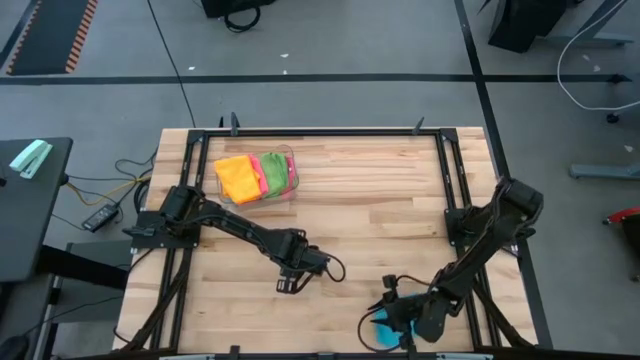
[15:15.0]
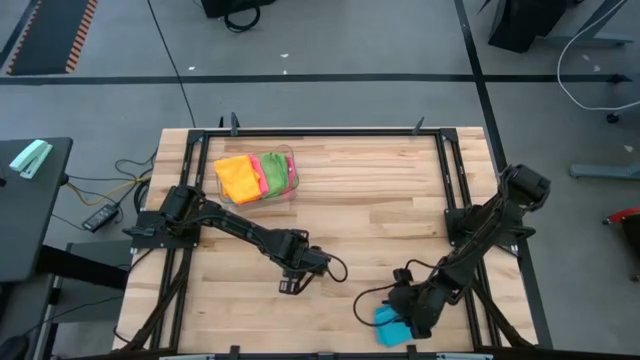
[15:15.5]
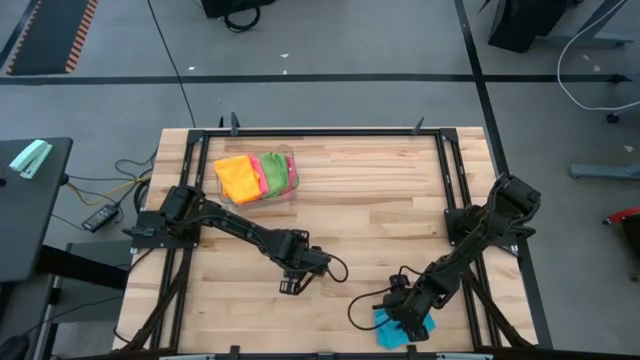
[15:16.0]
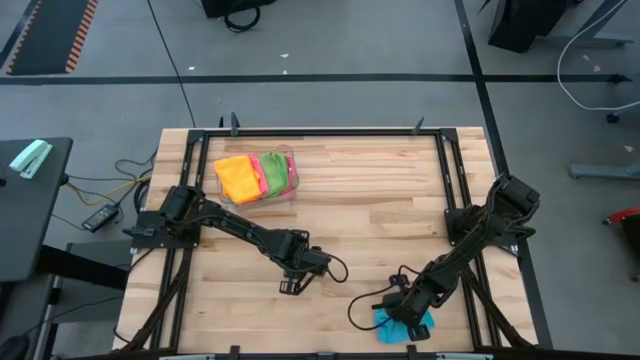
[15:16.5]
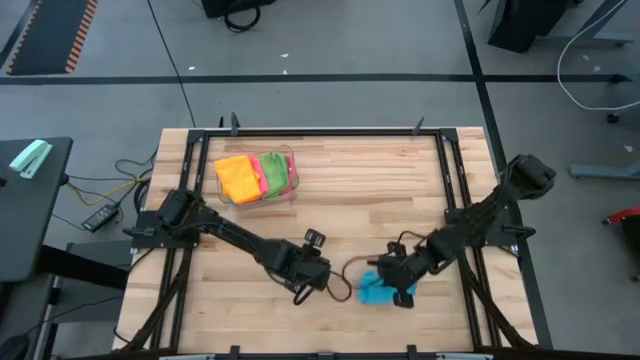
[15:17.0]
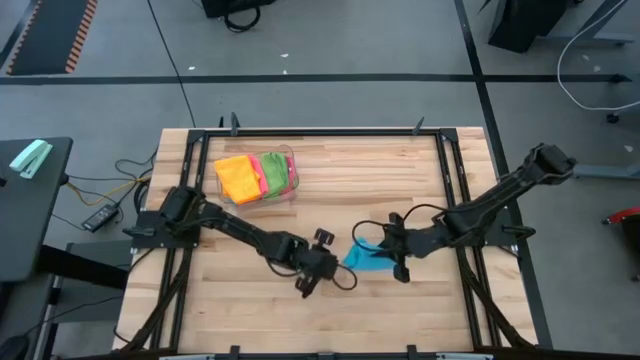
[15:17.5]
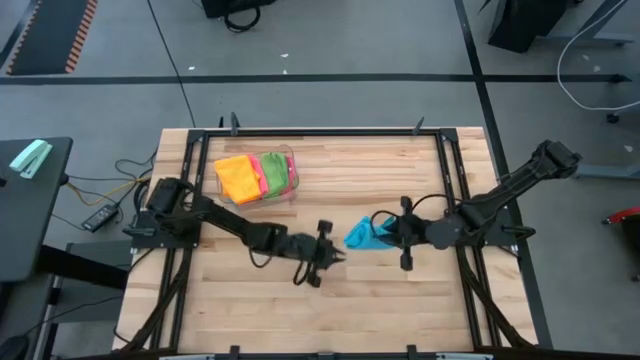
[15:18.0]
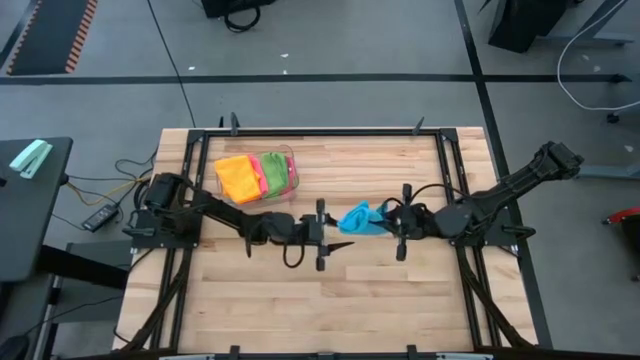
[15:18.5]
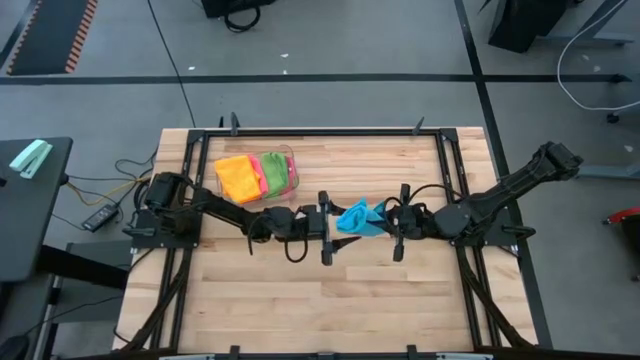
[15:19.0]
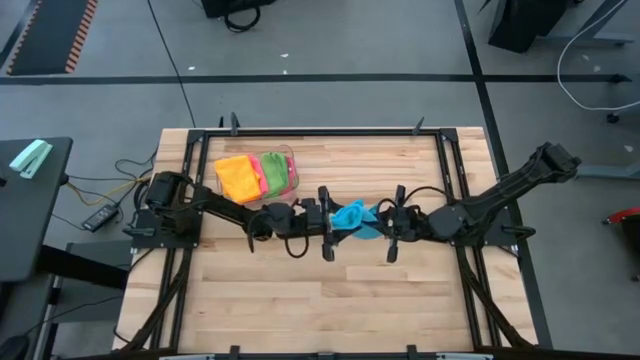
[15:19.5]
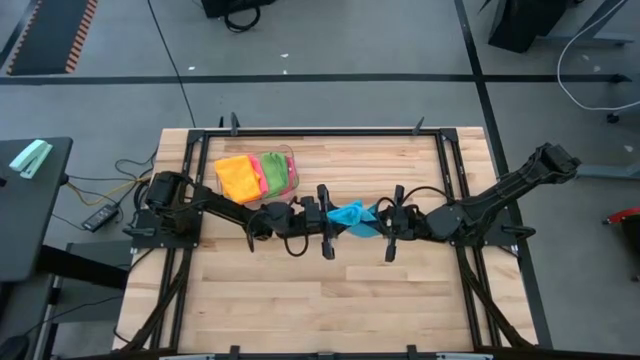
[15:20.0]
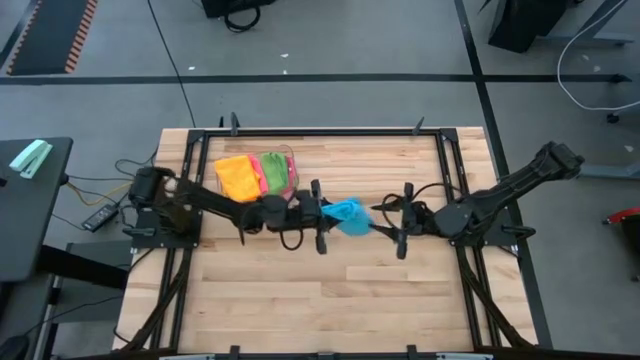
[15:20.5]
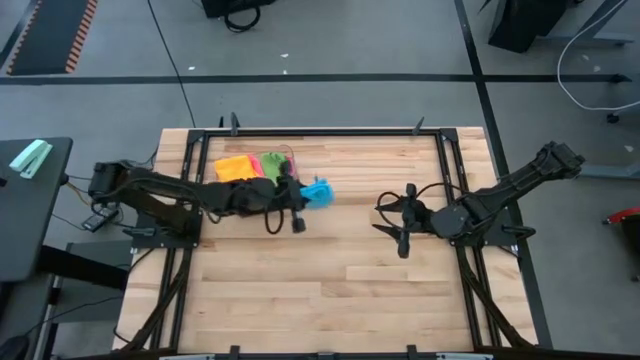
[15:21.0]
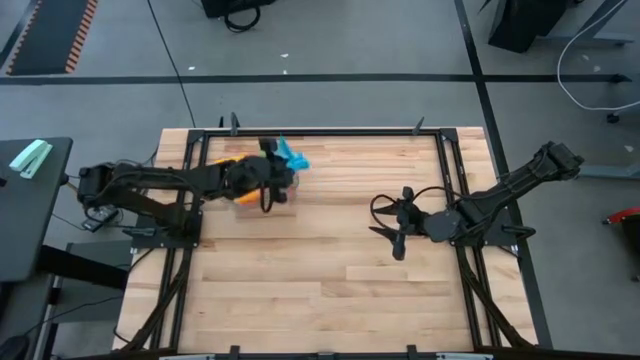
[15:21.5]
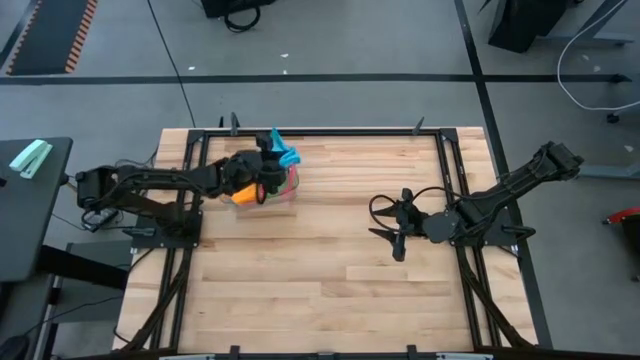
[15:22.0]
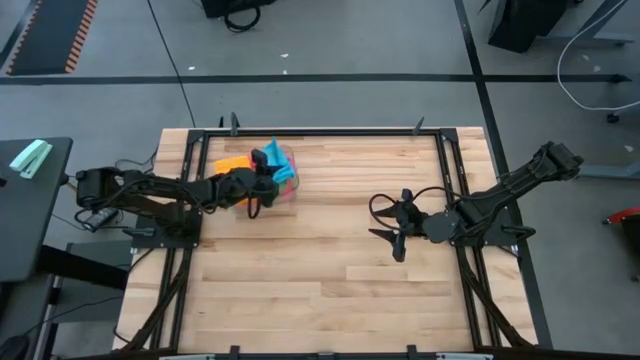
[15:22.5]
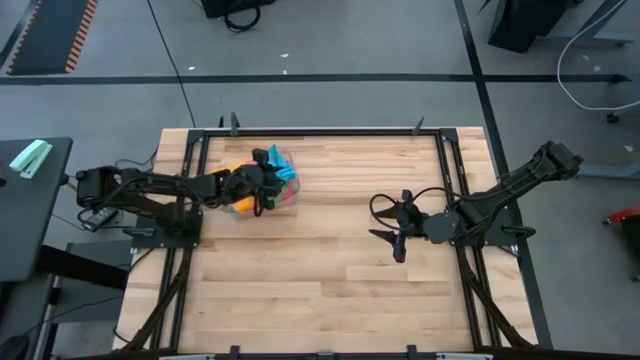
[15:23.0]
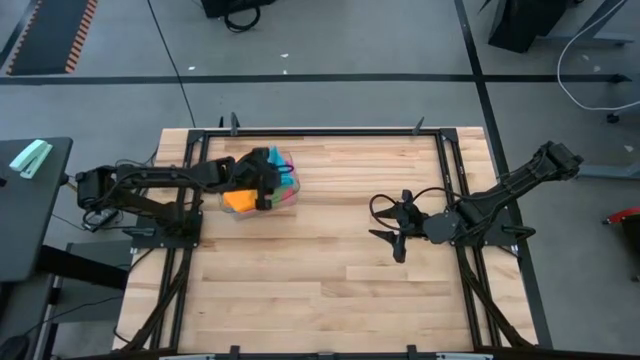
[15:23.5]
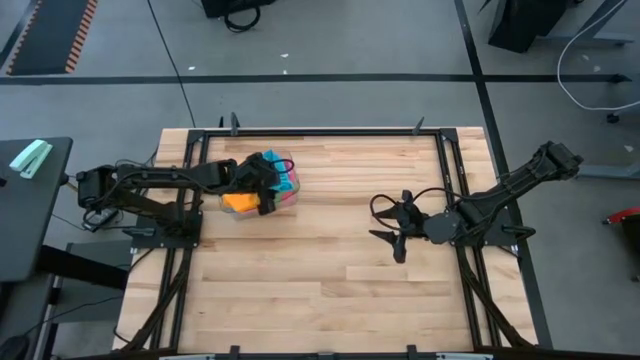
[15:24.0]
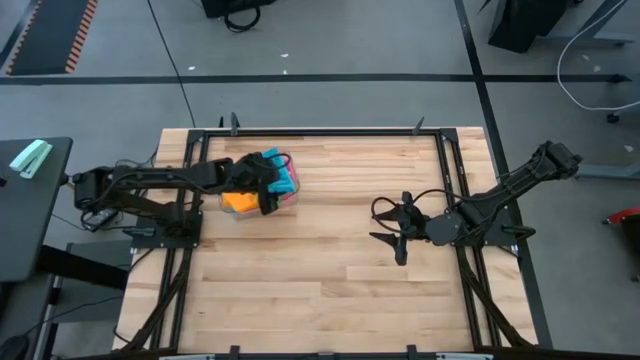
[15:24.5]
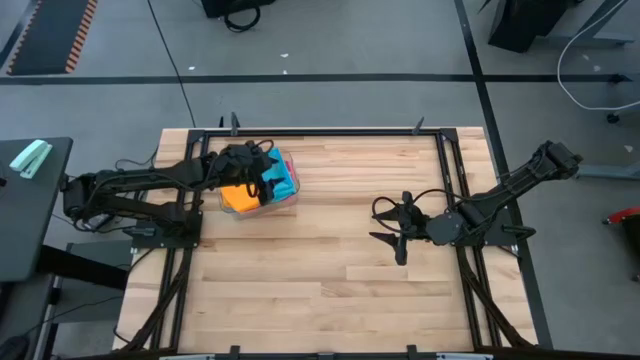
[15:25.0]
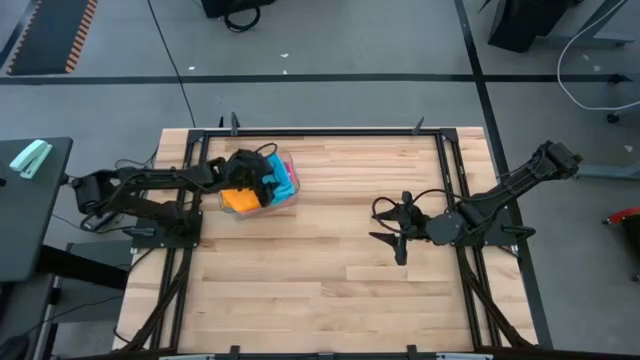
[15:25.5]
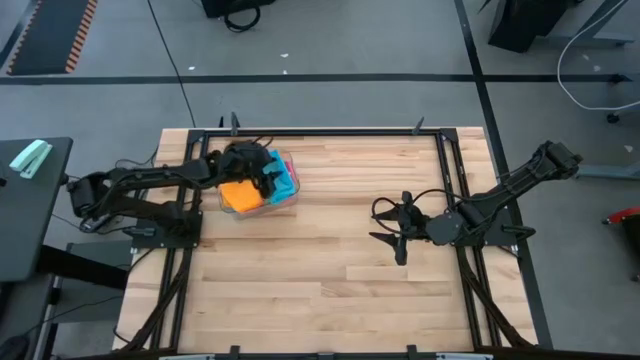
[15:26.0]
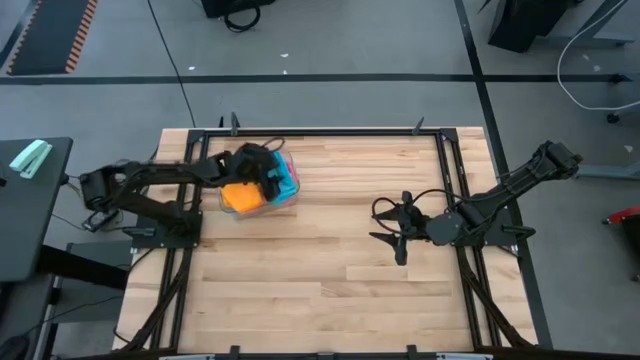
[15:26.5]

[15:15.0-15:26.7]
Task: Fold microfiber towels
Stack the blue microfiber towel on top of the green microfiber towel

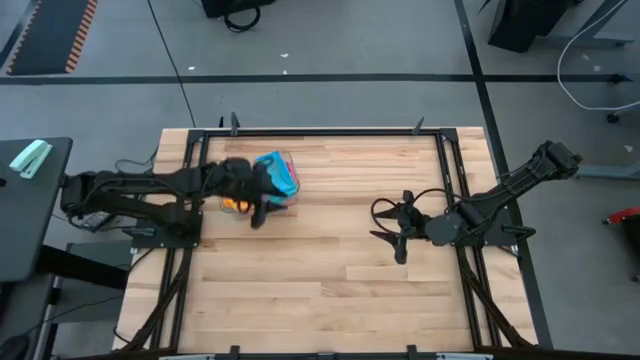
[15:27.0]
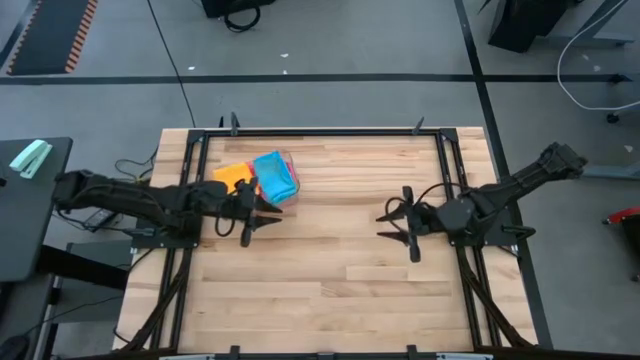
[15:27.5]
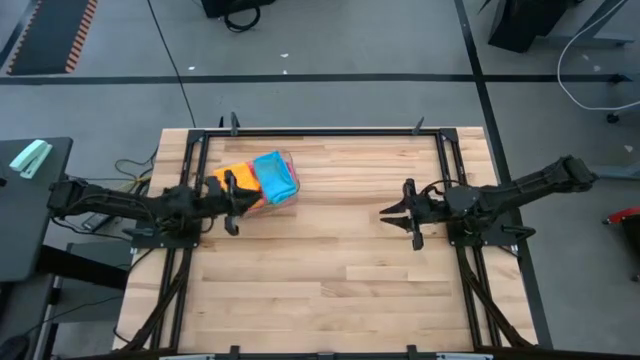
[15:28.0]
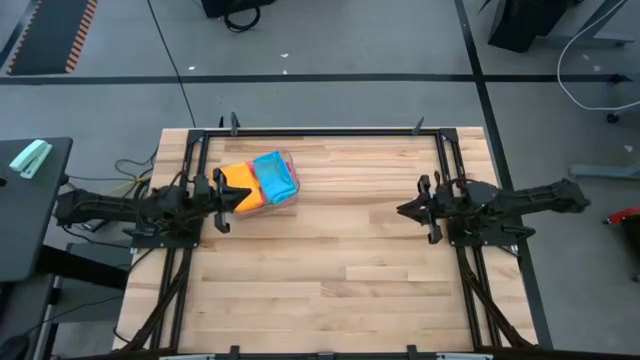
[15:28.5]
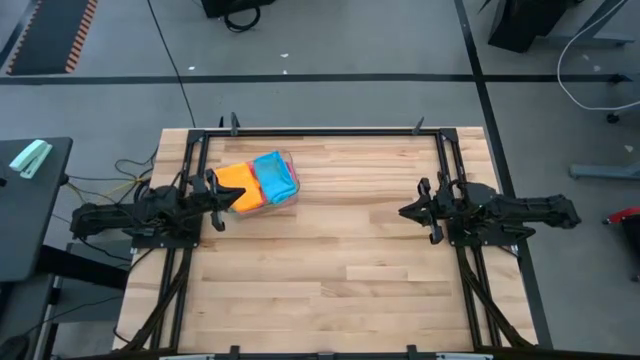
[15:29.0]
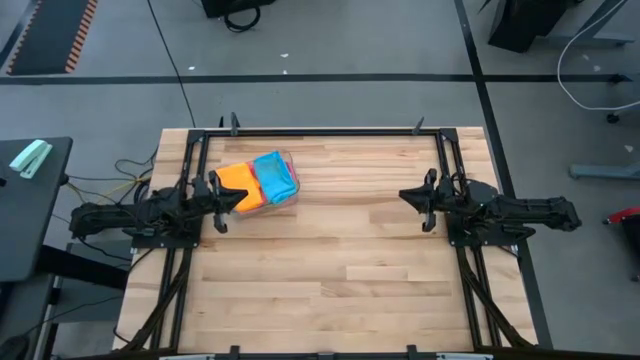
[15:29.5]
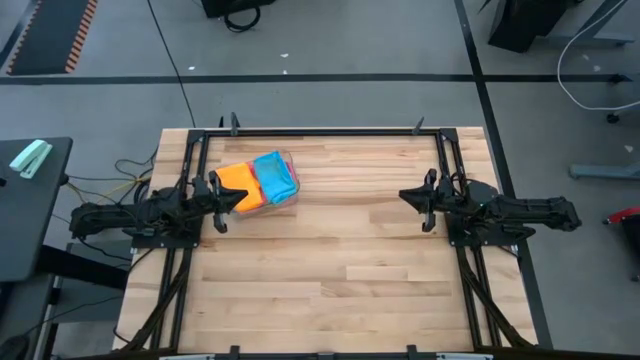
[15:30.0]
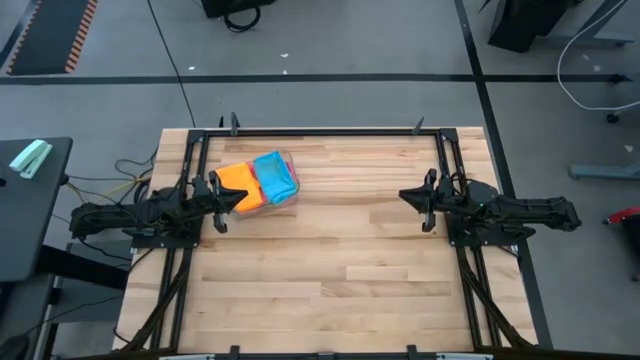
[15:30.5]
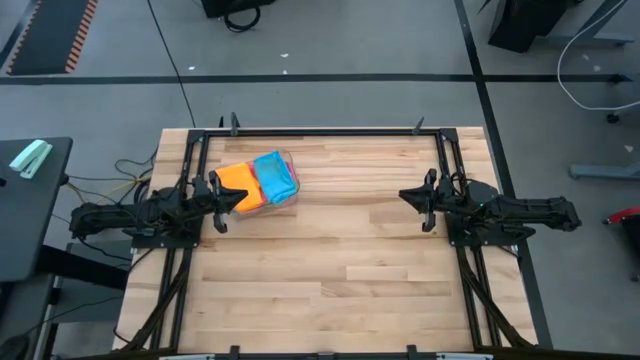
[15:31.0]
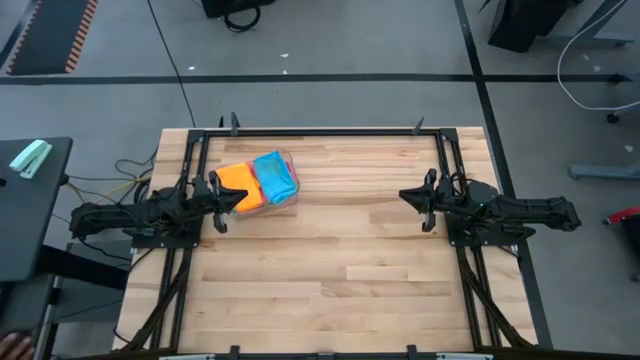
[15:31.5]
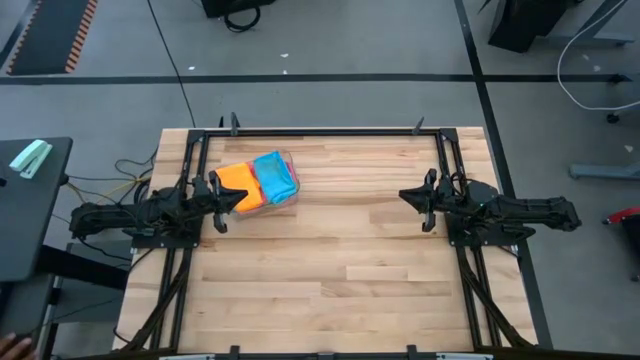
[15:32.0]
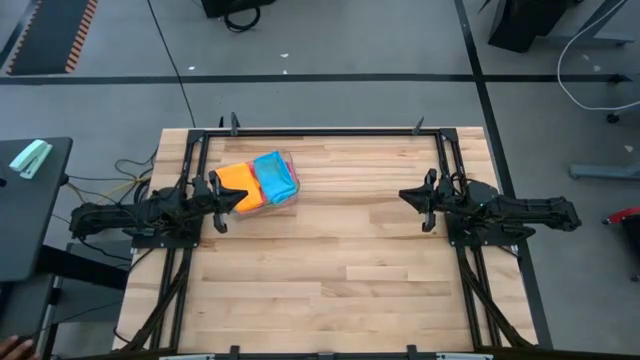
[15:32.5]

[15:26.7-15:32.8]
Return to Home Position

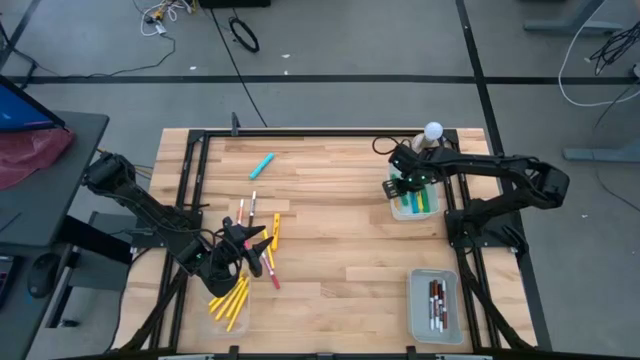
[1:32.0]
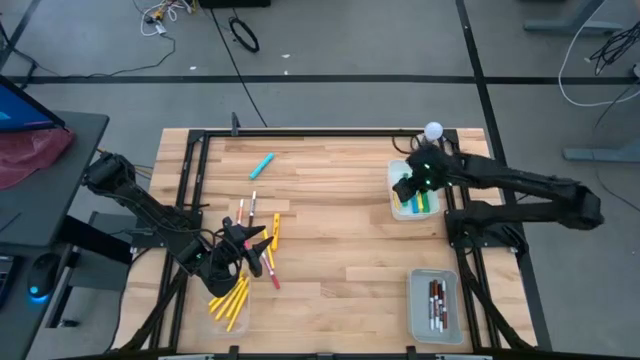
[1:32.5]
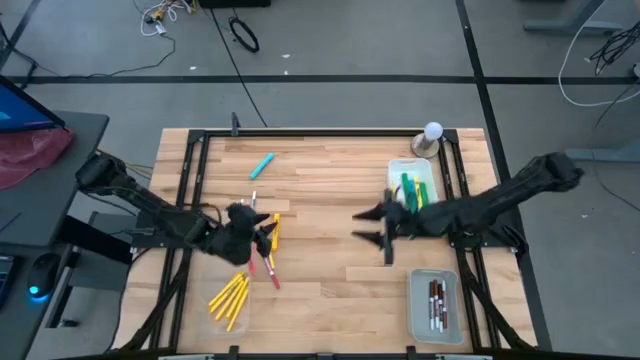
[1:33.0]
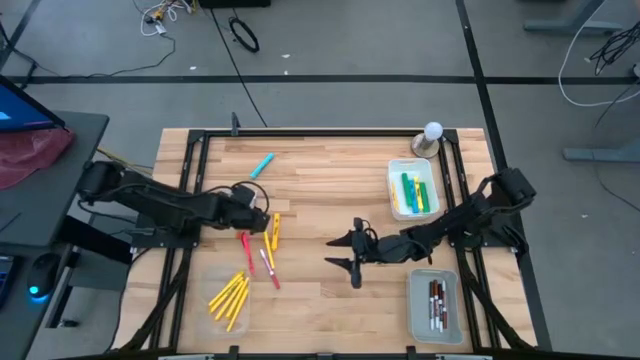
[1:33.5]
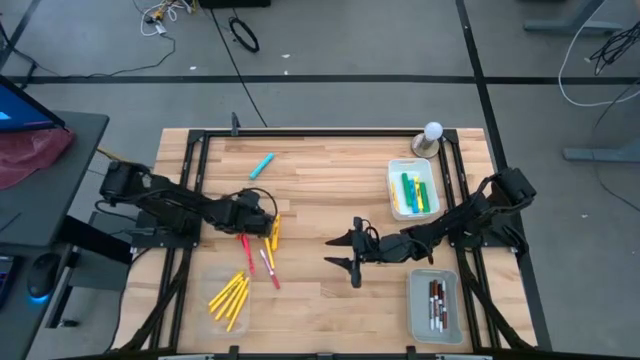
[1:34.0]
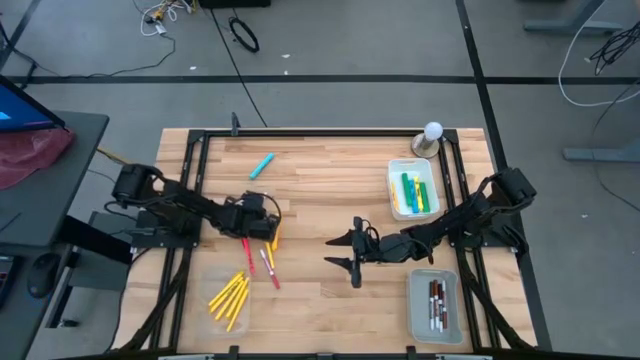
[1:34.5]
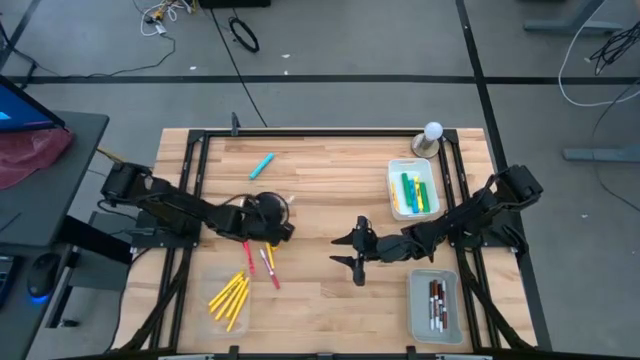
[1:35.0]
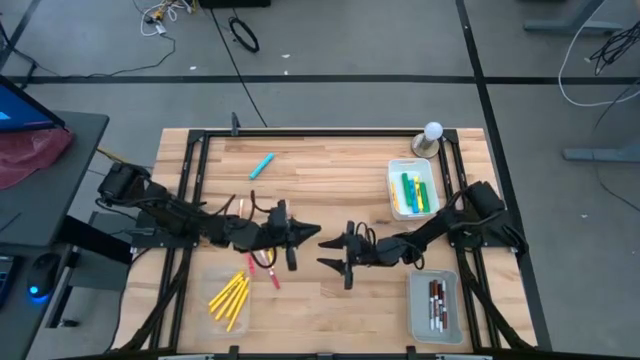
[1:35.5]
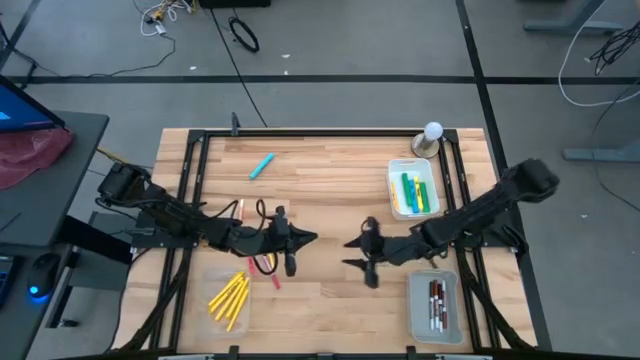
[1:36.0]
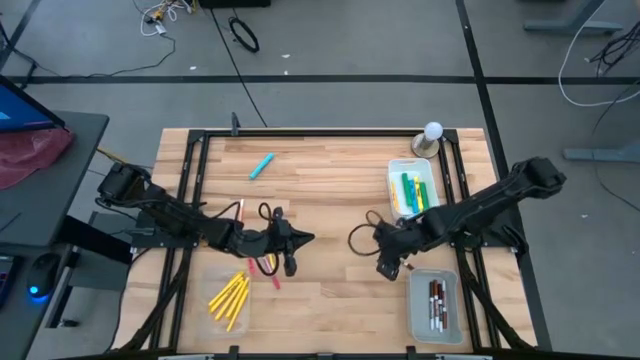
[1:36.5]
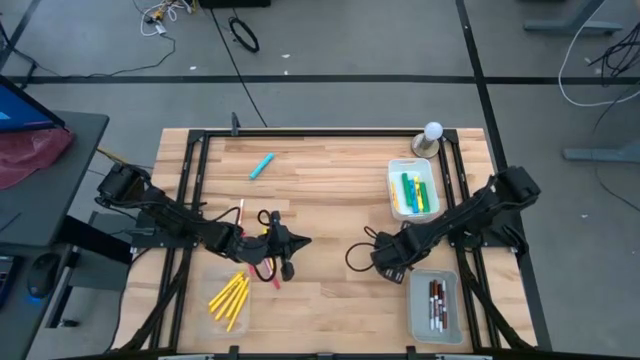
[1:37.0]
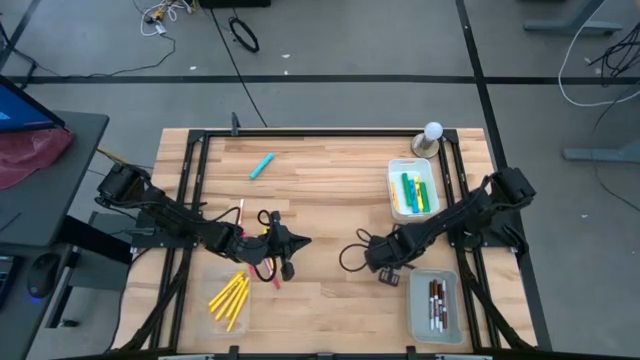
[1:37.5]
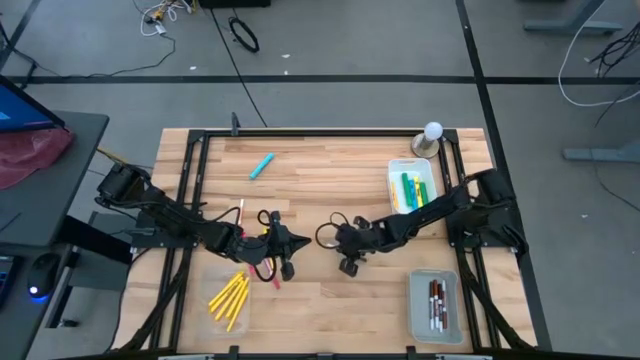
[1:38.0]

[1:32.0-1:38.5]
Task: Pick & Place Markers
Put the brown marker into the gray bin
